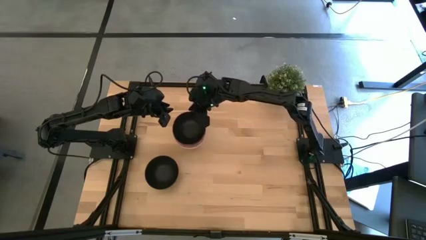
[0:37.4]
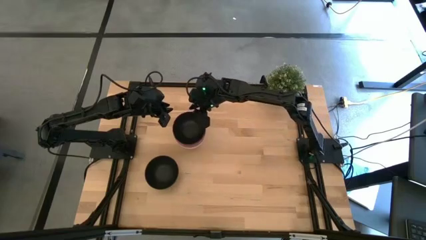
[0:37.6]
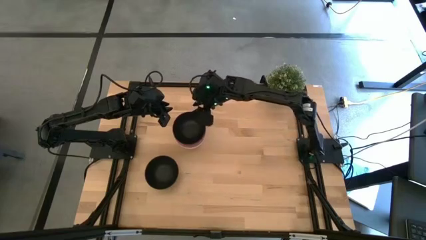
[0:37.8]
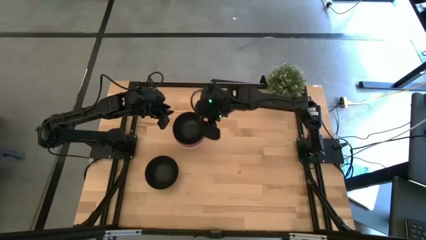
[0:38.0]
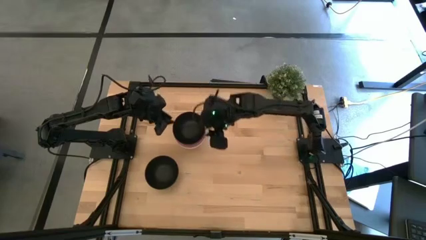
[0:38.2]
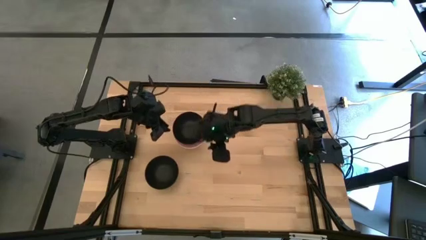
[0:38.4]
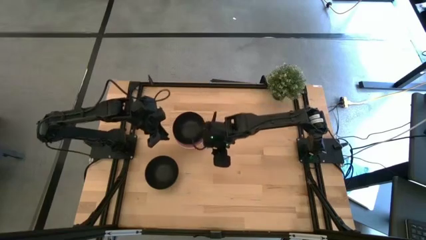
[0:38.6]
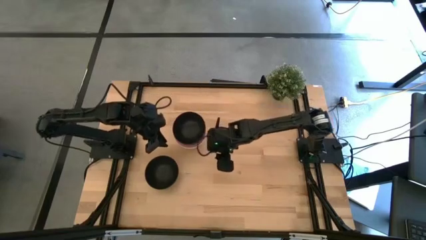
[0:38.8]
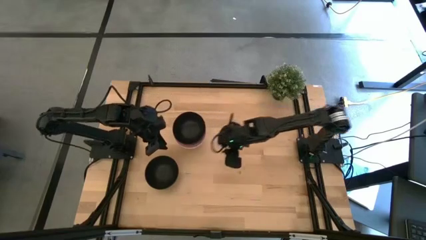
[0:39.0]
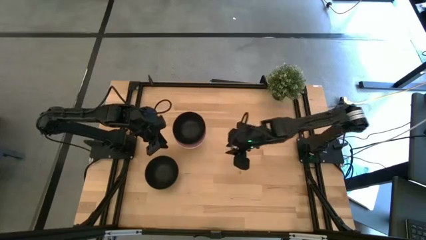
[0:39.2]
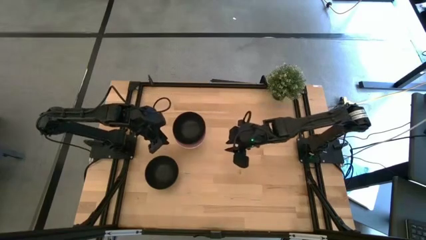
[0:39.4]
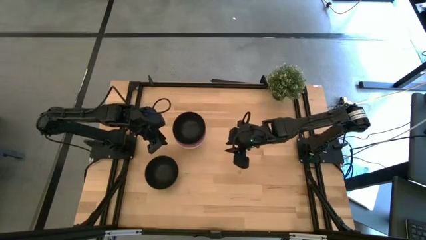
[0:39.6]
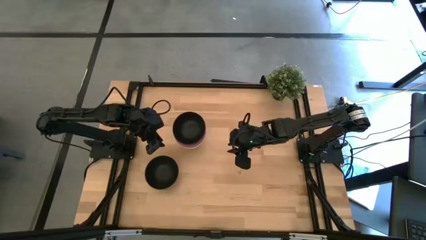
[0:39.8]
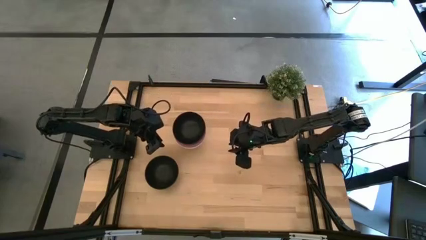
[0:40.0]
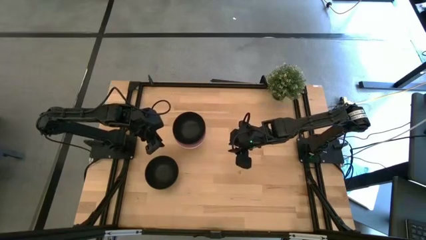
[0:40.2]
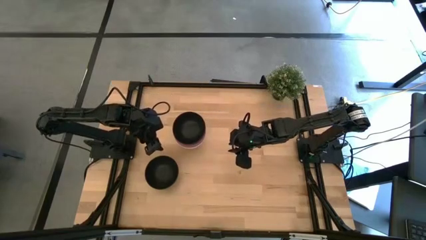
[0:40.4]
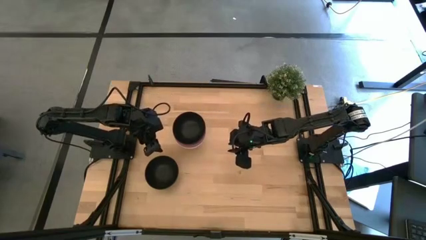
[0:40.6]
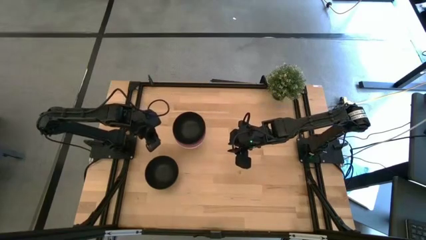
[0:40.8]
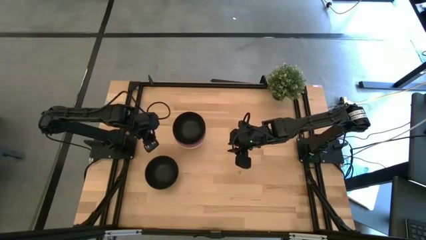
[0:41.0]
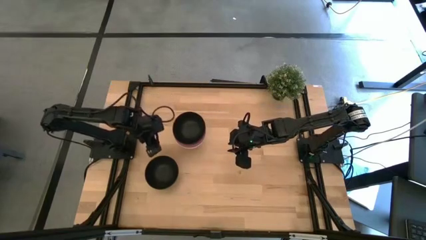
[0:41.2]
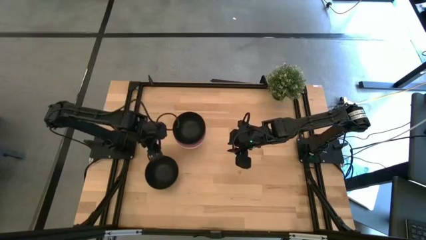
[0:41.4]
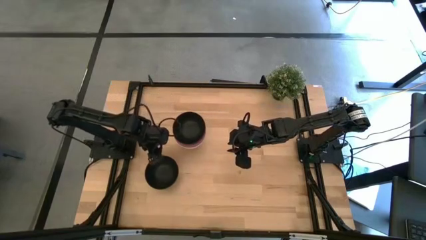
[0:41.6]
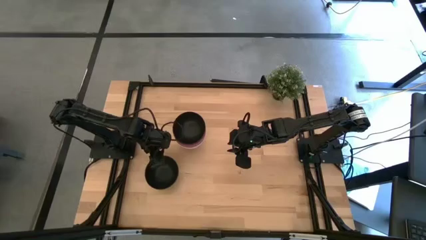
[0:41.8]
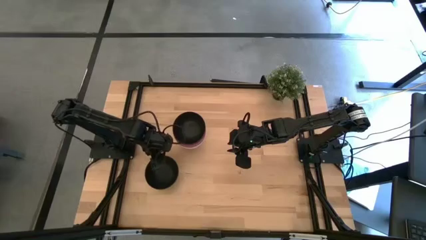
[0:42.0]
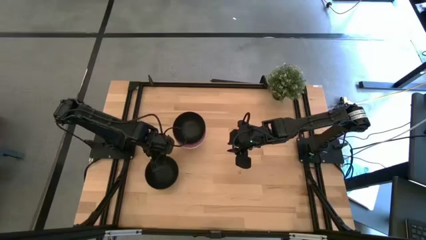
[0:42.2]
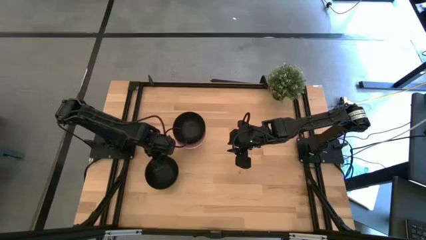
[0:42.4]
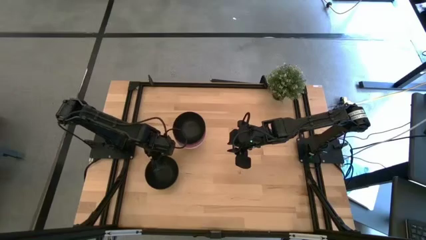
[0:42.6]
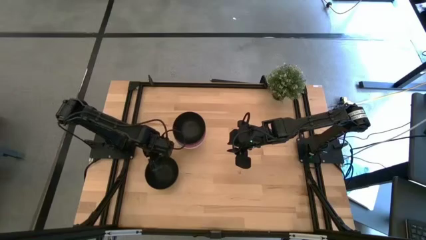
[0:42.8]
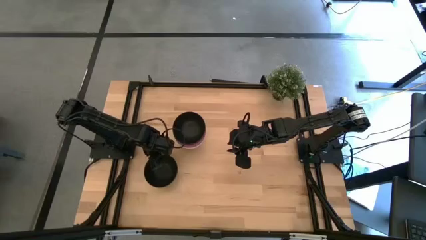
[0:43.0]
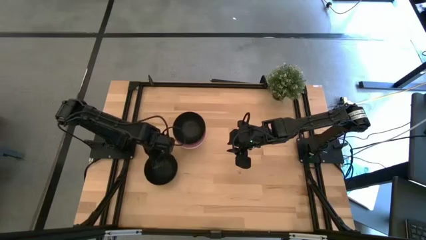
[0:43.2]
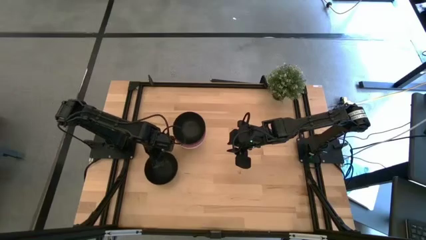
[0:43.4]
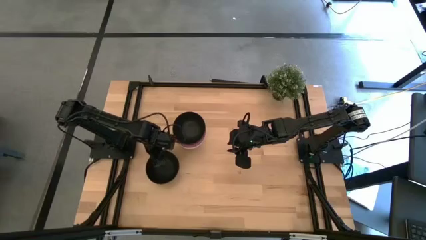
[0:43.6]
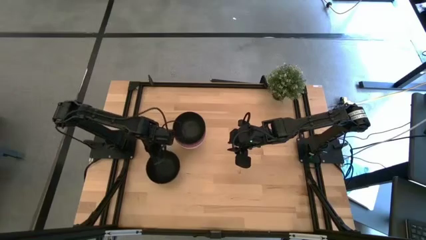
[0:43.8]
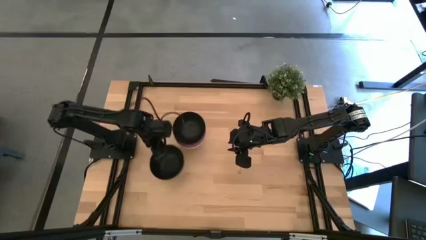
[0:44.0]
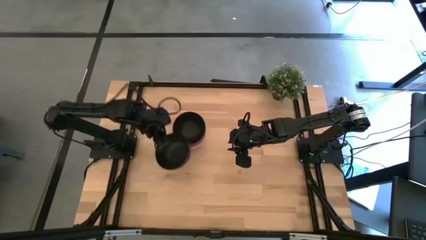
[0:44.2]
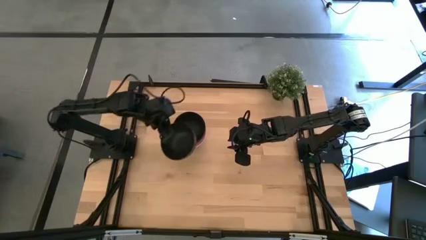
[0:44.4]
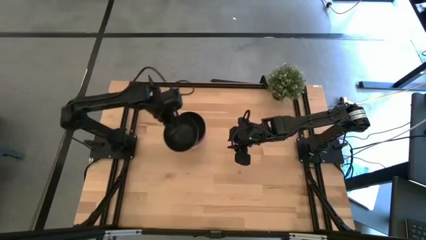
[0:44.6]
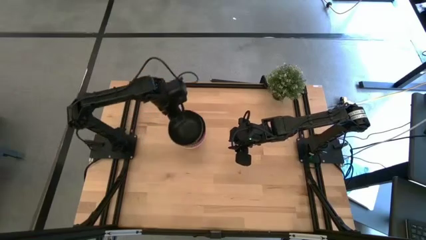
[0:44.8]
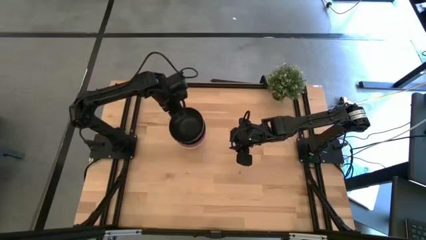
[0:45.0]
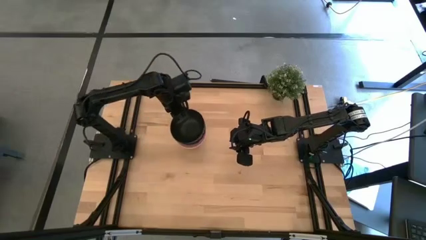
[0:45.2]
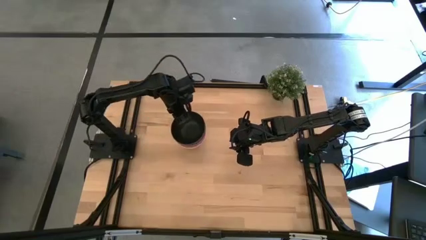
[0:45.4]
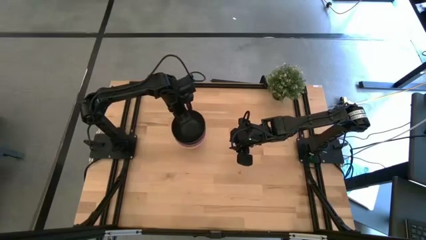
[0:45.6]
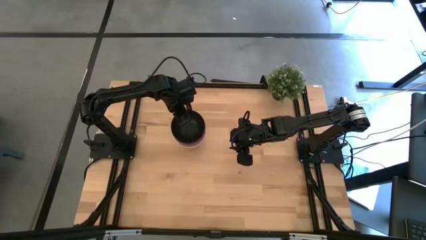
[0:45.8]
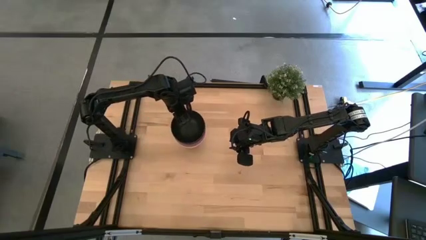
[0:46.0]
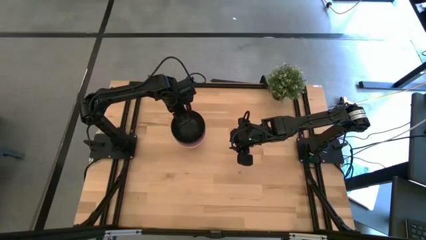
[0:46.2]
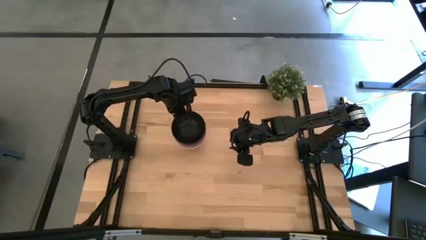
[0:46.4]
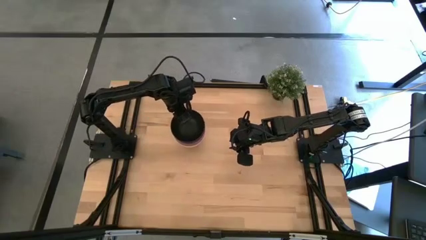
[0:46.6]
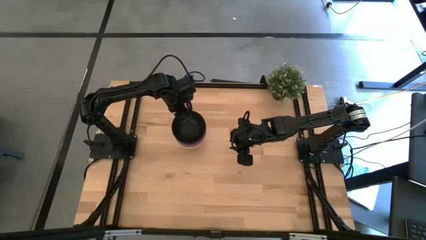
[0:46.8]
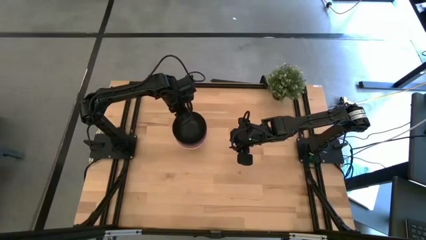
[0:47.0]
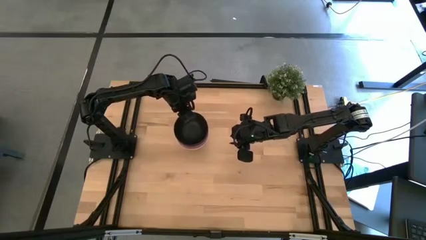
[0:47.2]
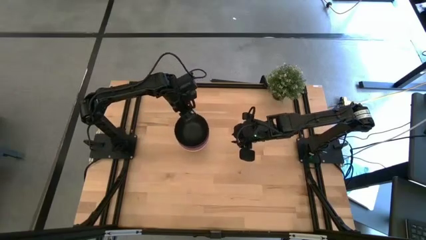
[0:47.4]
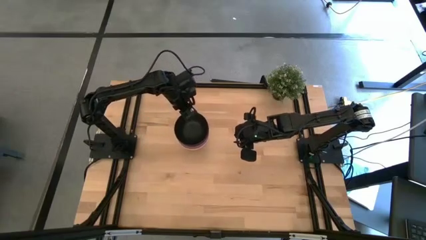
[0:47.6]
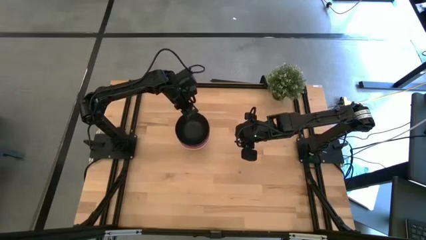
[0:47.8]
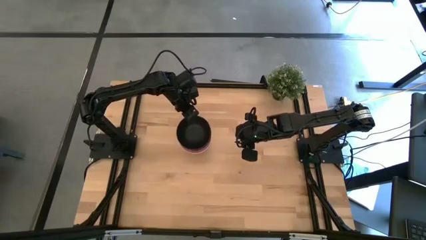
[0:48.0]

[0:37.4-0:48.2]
Task: Nest bowls inside each other
Stack the black bowl on top of the black bowl

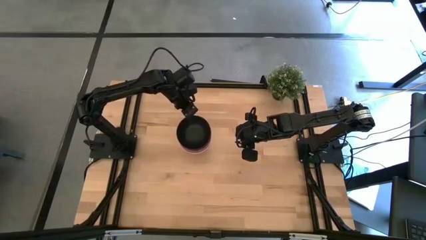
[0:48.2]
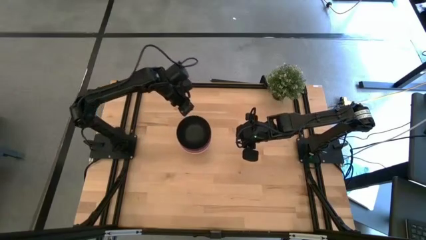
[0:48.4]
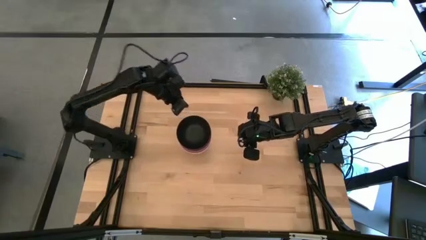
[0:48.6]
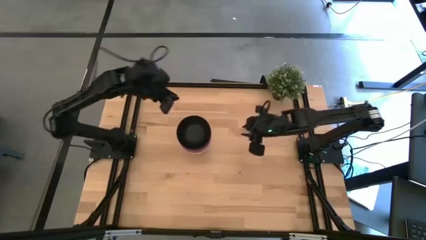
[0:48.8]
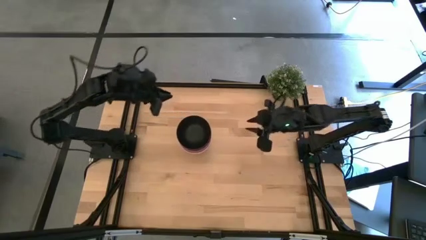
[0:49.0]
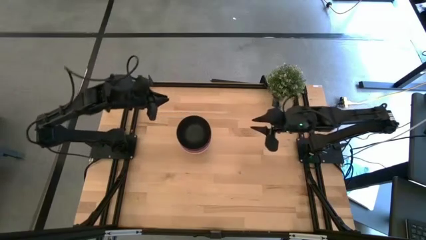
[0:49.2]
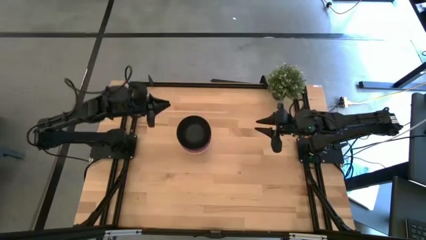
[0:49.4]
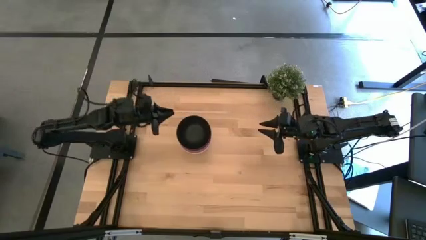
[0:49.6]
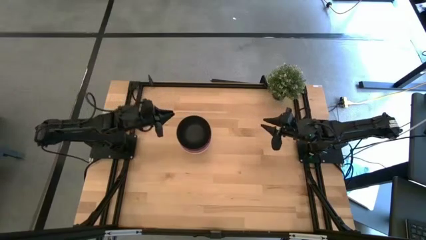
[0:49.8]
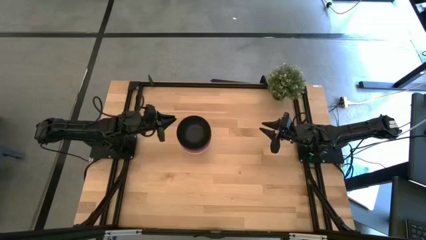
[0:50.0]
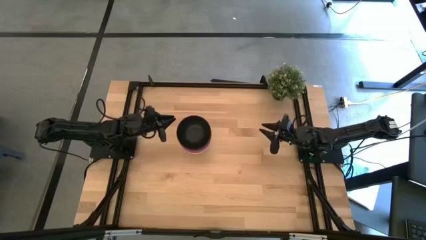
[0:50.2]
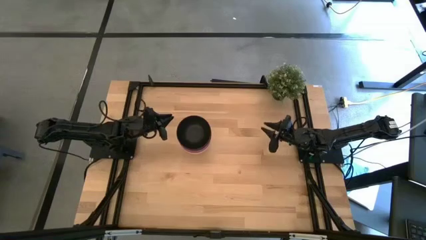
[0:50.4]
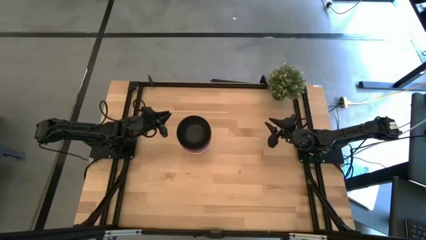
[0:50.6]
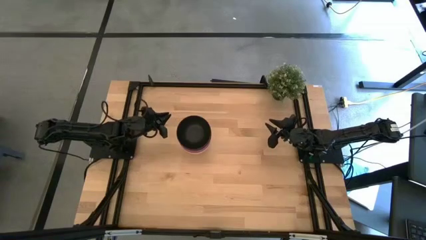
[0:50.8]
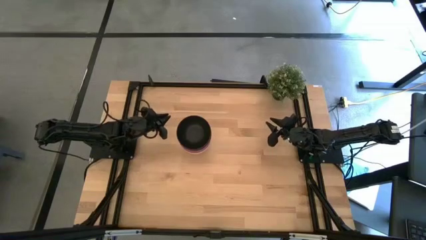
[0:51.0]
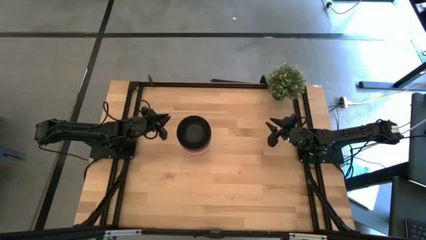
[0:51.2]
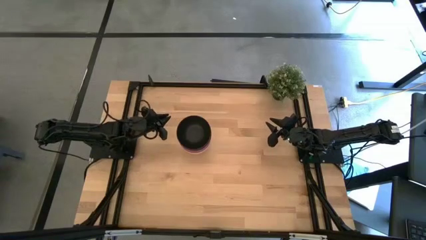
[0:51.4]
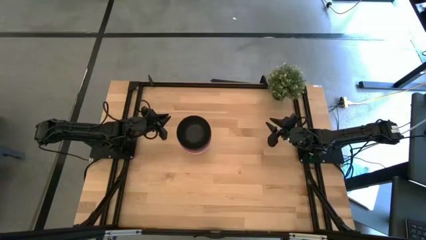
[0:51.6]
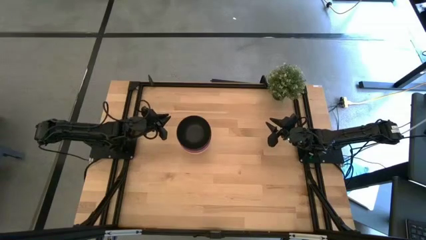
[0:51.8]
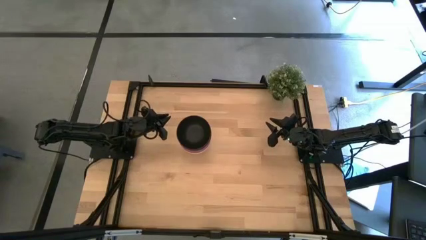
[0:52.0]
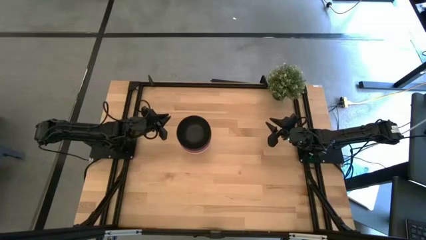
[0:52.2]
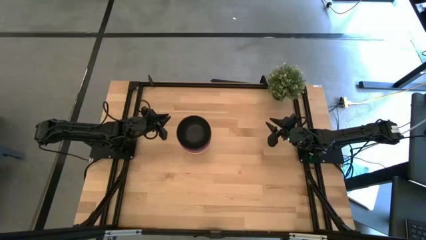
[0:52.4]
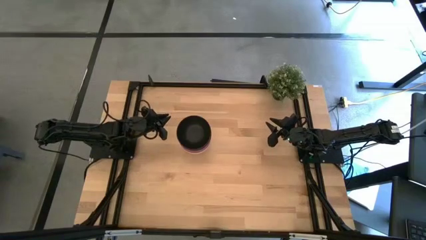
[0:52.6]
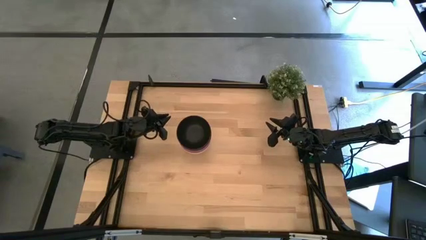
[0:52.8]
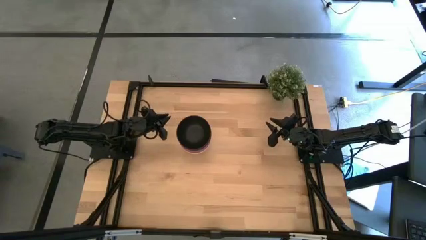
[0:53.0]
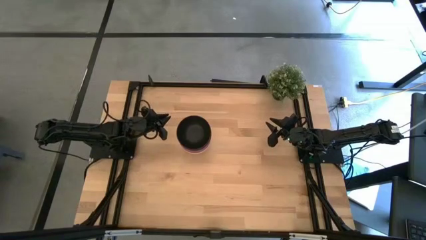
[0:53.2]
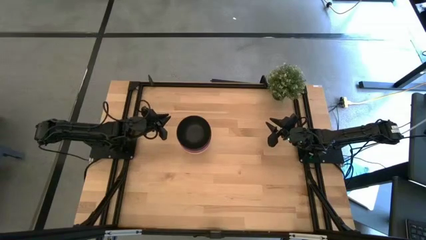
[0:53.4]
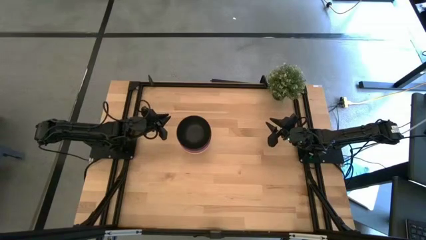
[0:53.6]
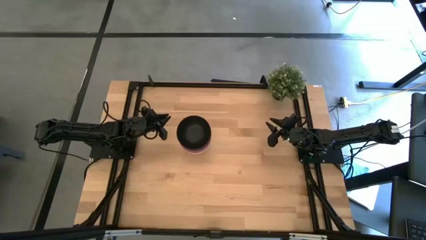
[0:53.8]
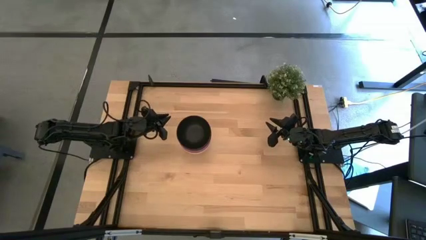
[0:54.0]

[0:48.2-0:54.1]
Return to Home Position
